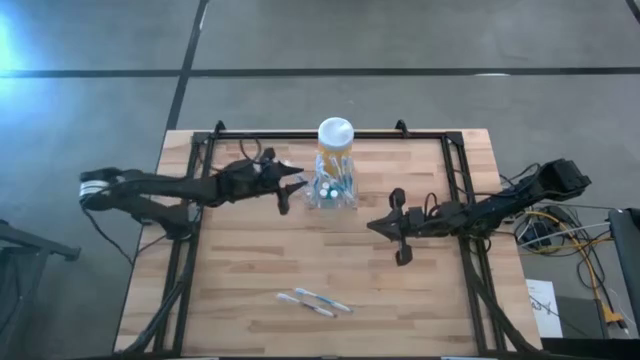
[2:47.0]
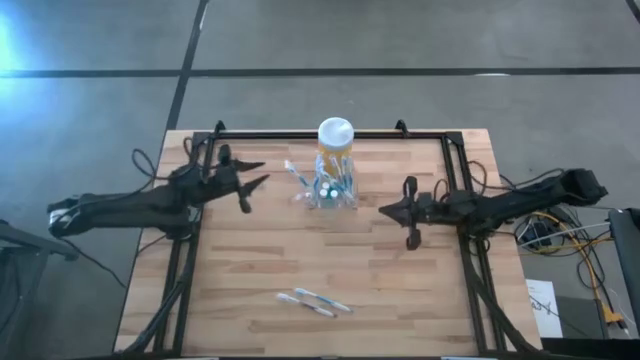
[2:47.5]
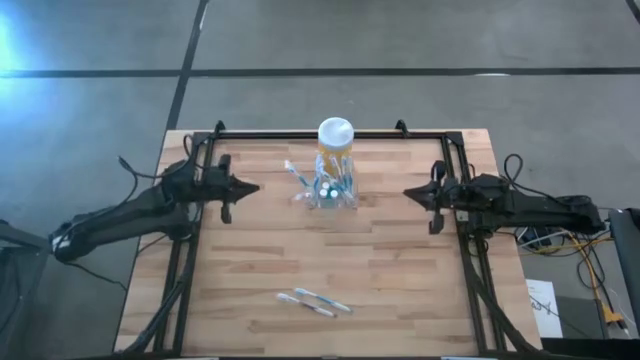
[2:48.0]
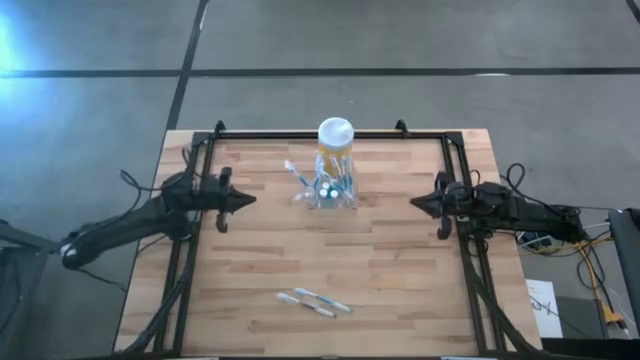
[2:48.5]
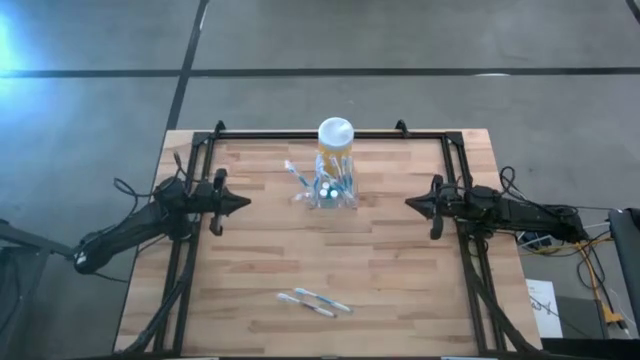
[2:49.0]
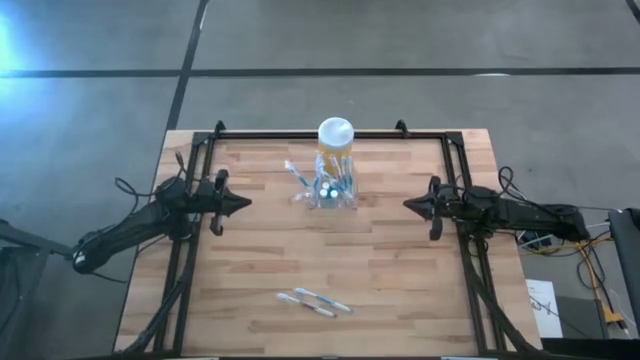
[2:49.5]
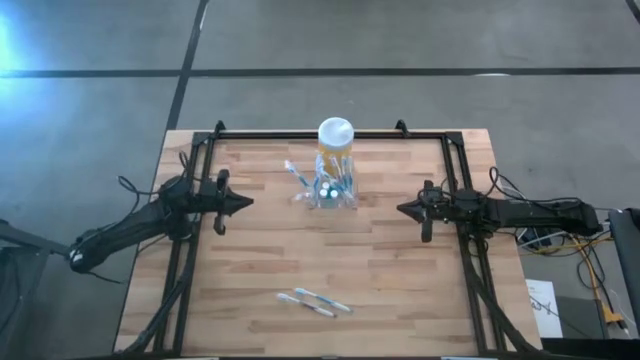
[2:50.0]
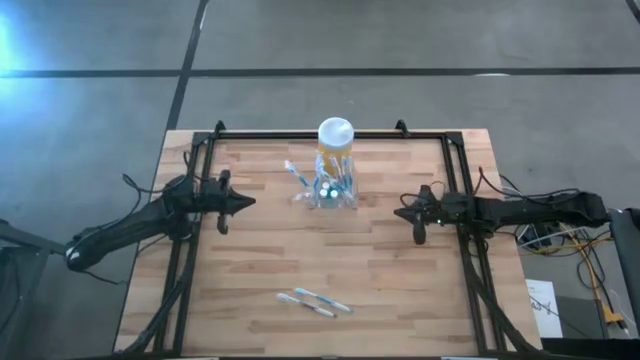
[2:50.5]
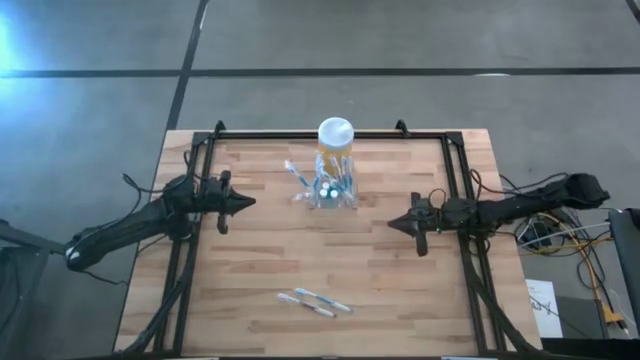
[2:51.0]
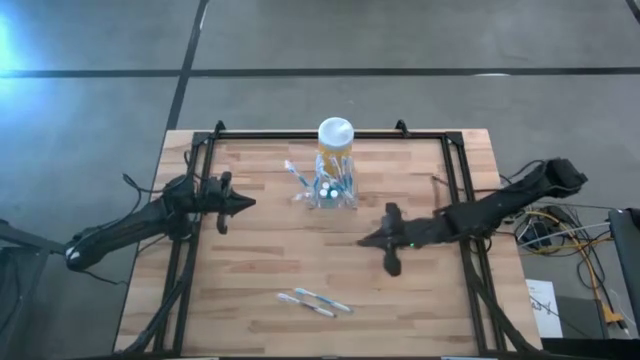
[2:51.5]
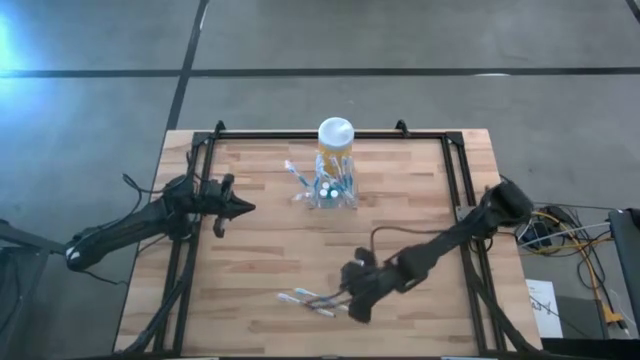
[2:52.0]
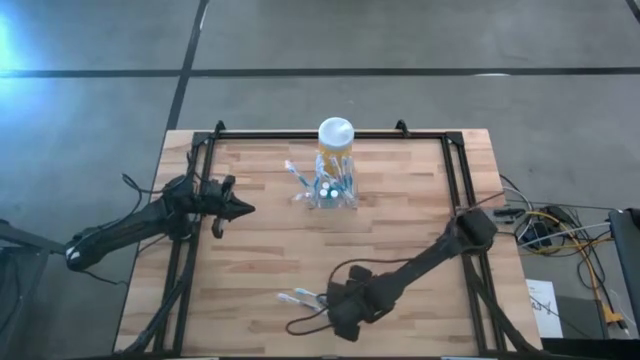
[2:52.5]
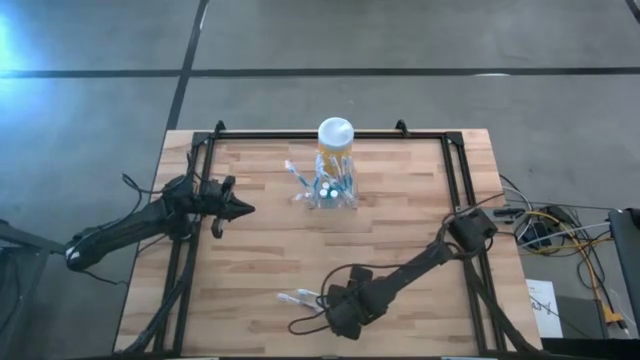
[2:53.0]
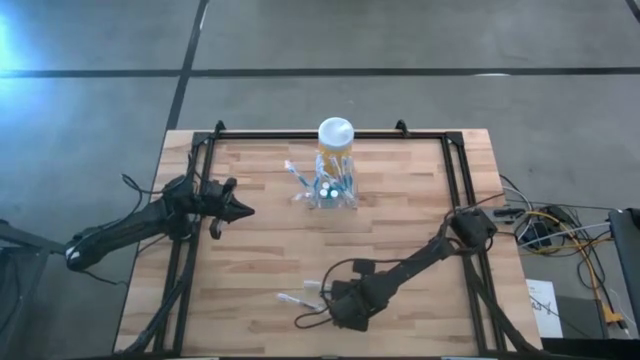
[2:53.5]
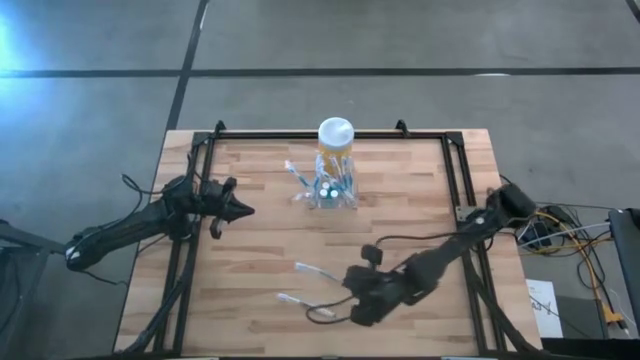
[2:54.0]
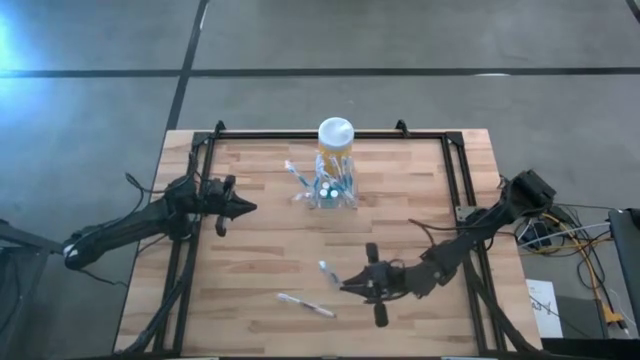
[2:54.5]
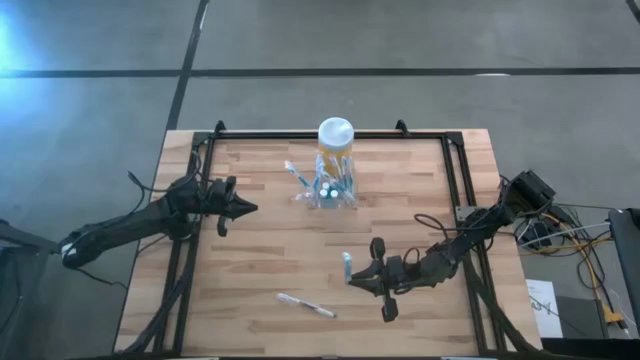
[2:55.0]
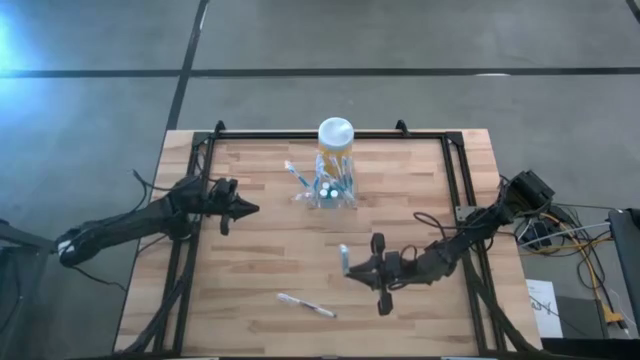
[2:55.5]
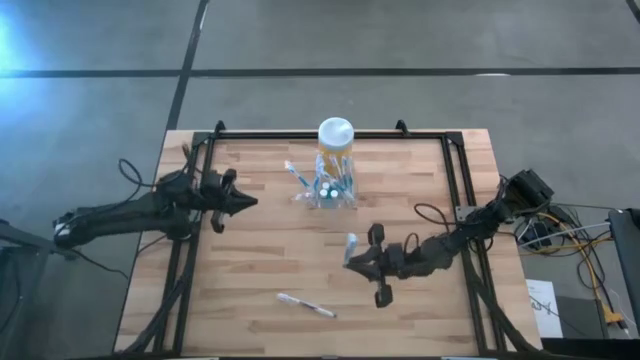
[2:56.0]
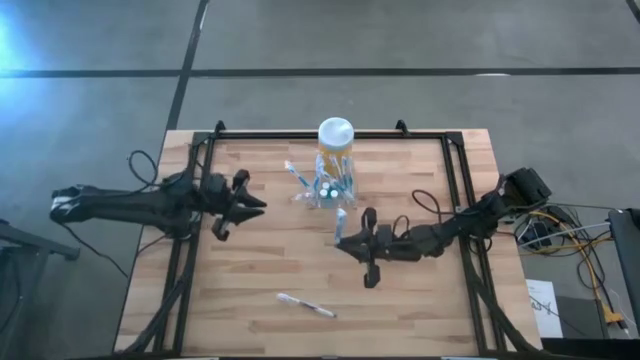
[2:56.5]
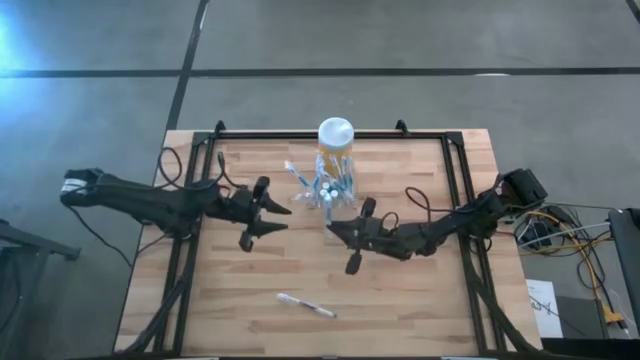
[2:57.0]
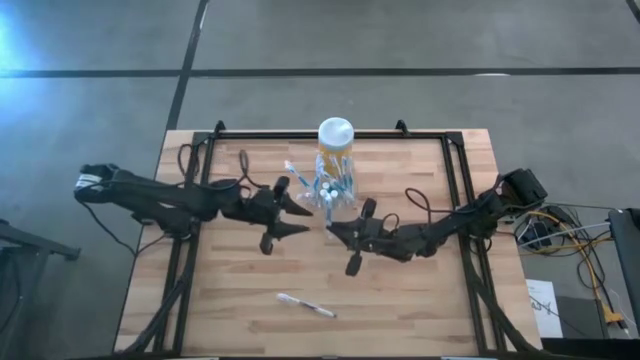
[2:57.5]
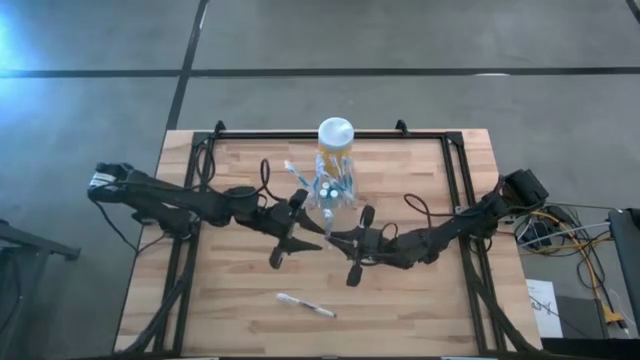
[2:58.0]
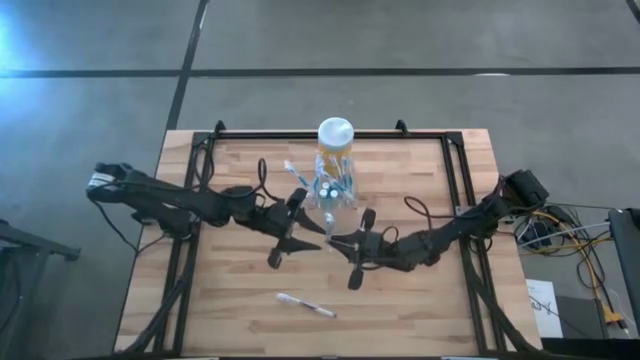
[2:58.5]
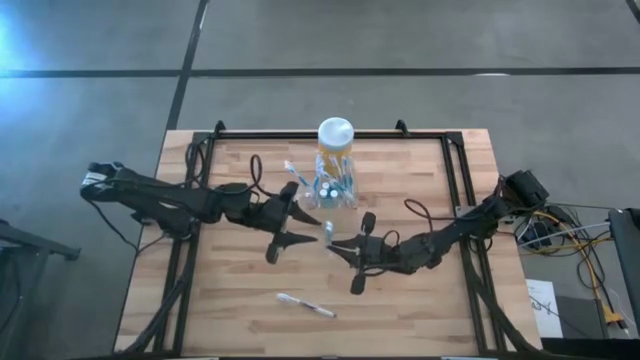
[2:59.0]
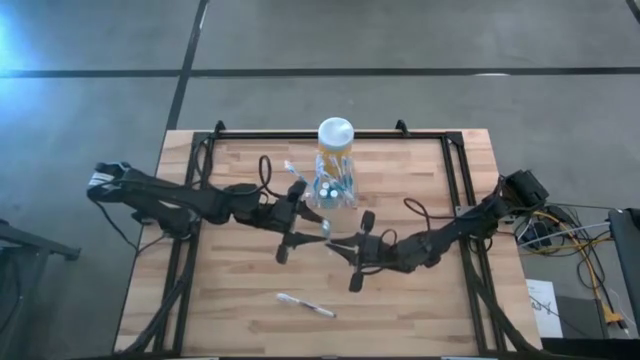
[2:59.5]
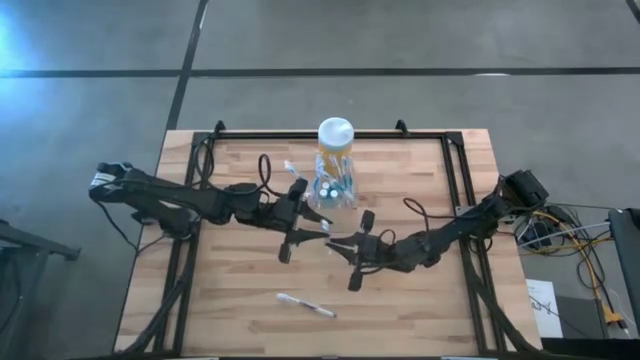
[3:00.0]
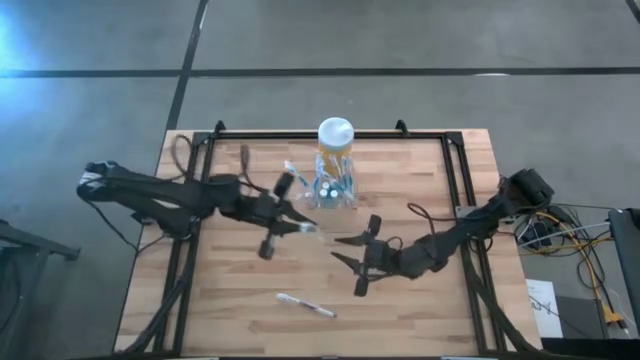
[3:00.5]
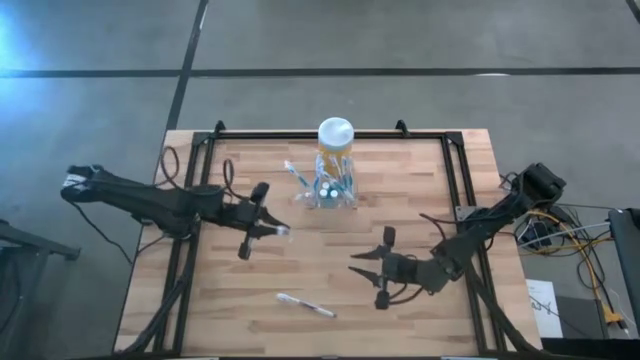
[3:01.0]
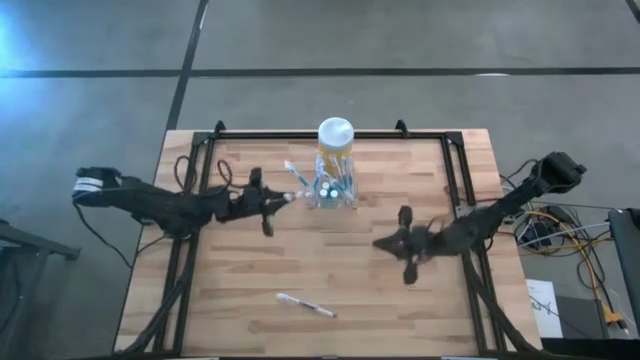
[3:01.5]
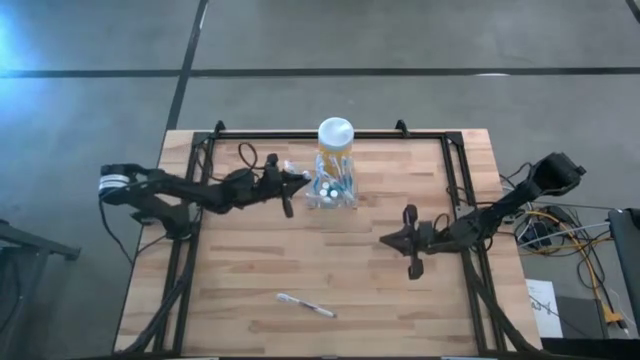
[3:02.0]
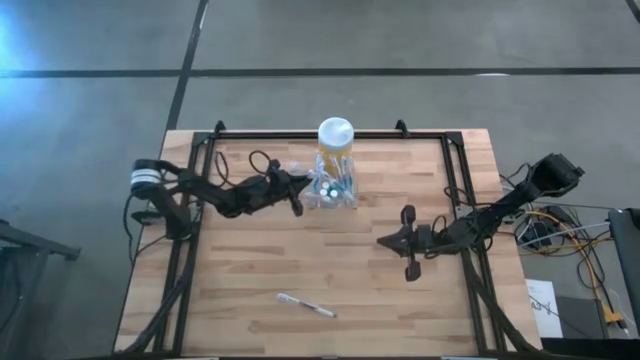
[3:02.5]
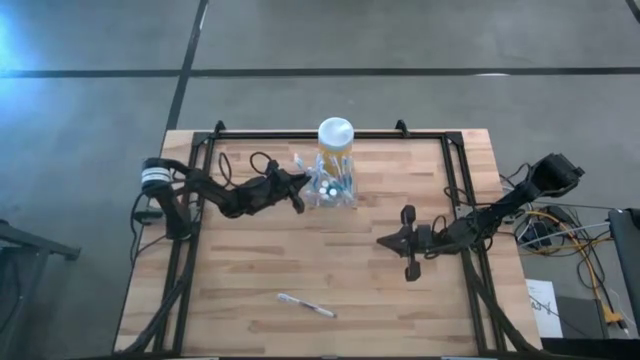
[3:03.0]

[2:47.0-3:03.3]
Task: Pick & Place toothbrushing station
Put the blue toothbrush into the transparent organizer

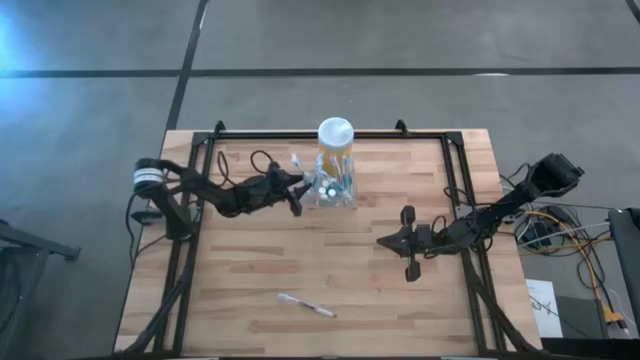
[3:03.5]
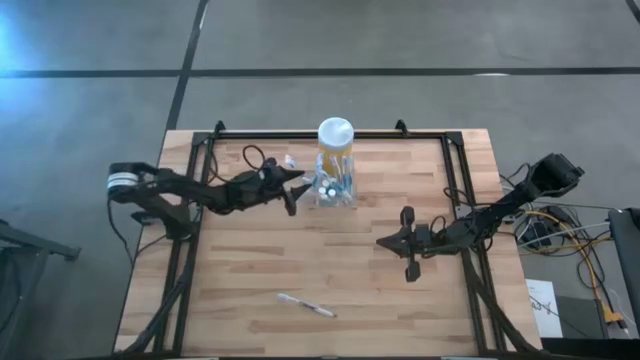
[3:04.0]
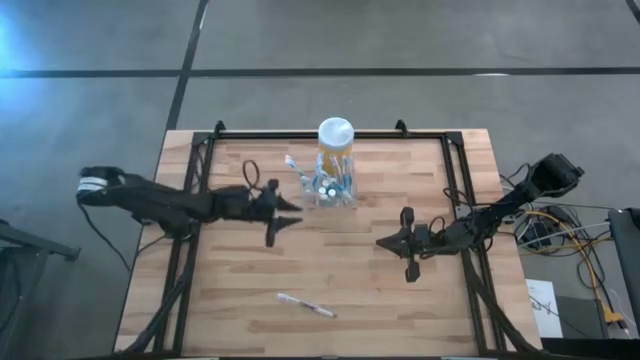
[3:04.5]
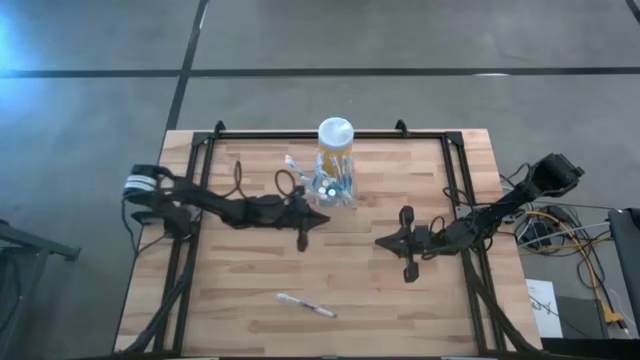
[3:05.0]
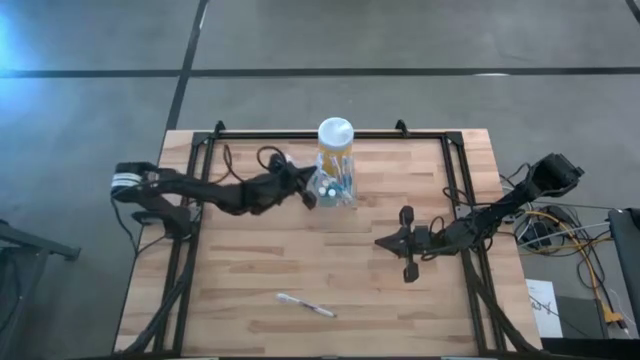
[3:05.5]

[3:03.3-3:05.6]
Adjust the orange toothbrush in the transparent organizer

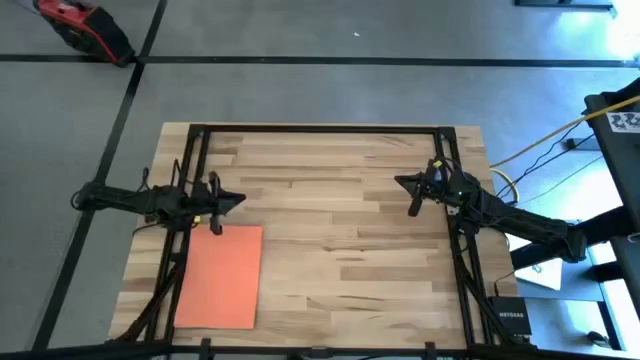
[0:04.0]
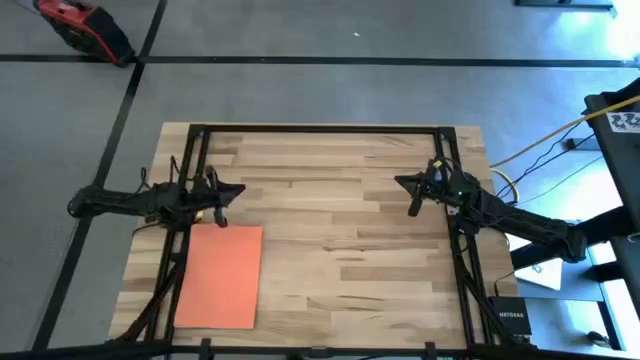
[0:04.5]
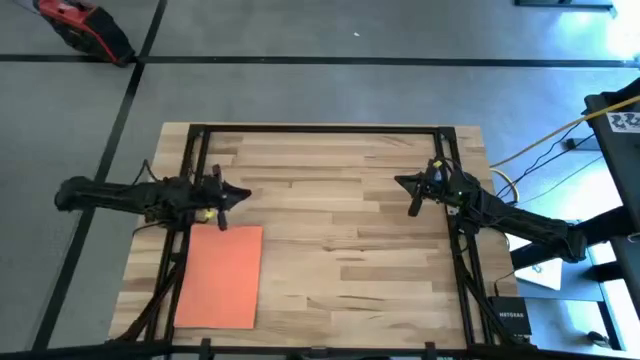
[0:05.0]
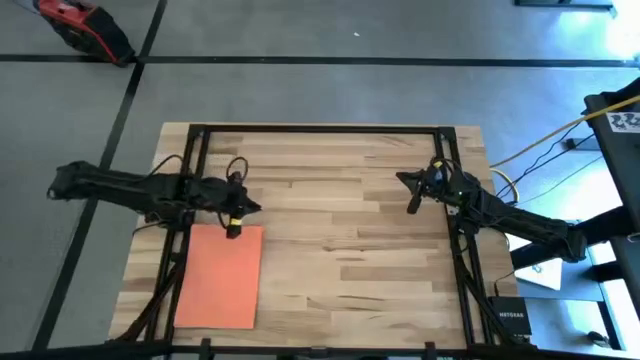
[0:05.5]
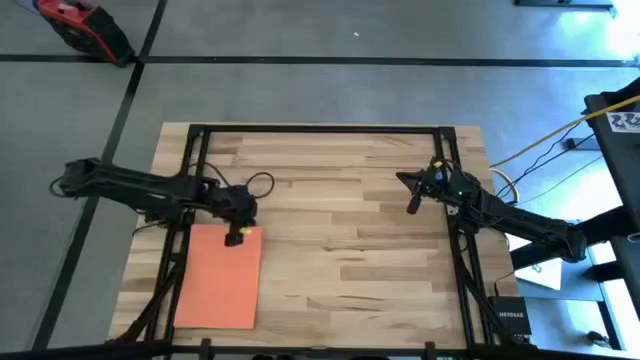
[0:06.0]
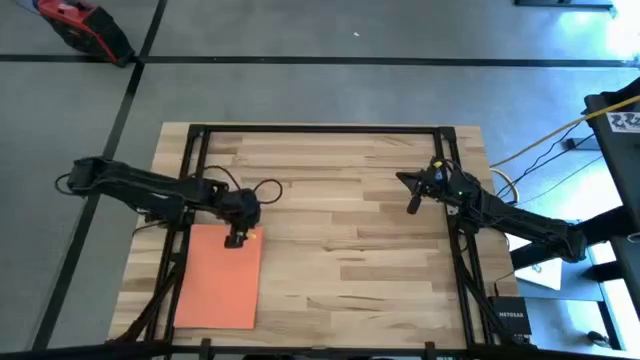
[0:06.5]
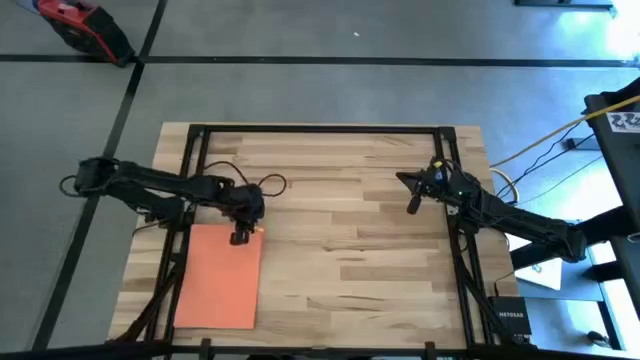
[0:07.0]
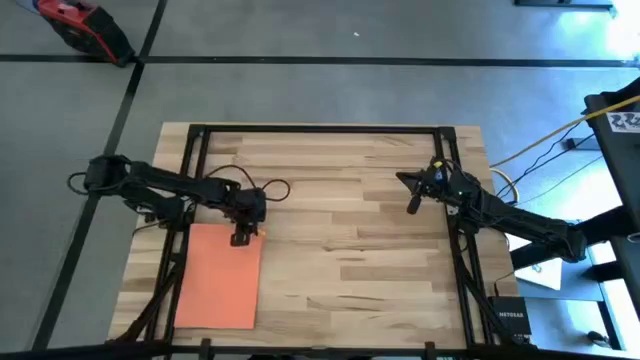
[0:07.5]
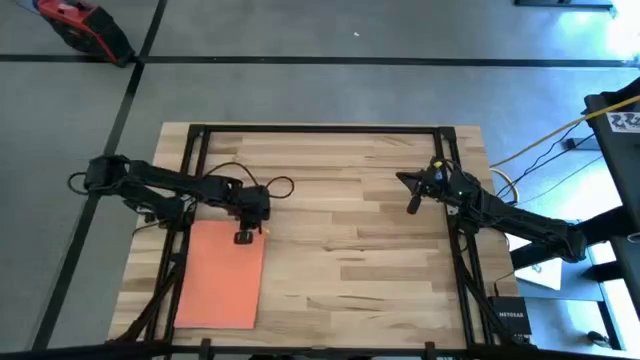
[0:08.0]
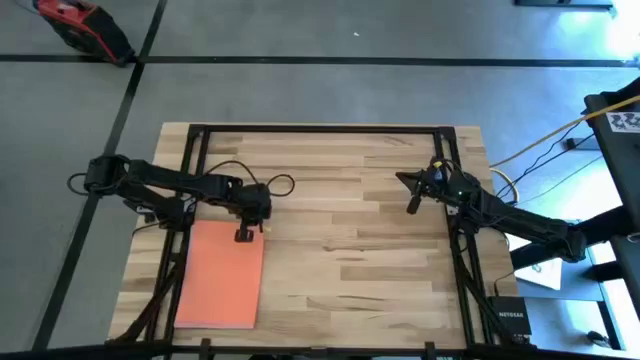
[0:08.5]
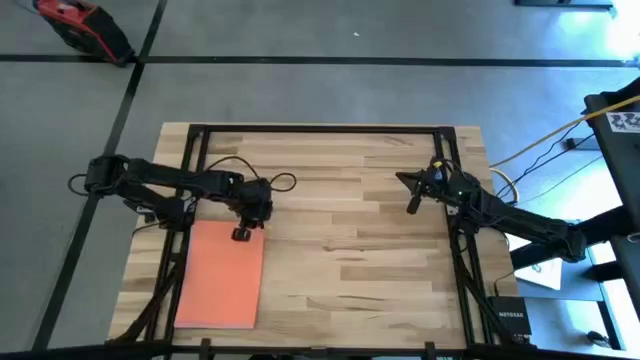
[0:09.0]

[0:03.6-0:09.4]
Task: Organize paper
Move the orange paper from bottom left to the top right table
